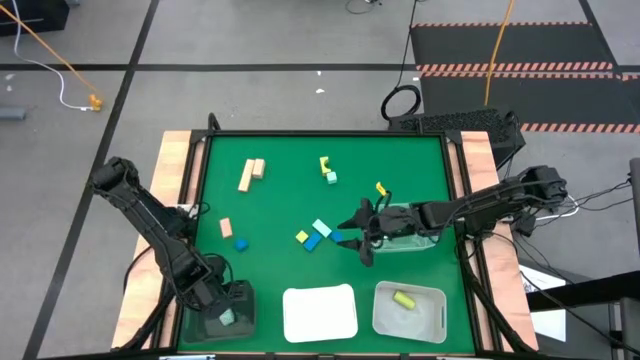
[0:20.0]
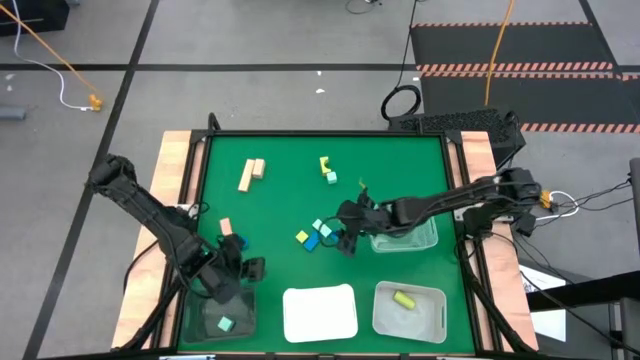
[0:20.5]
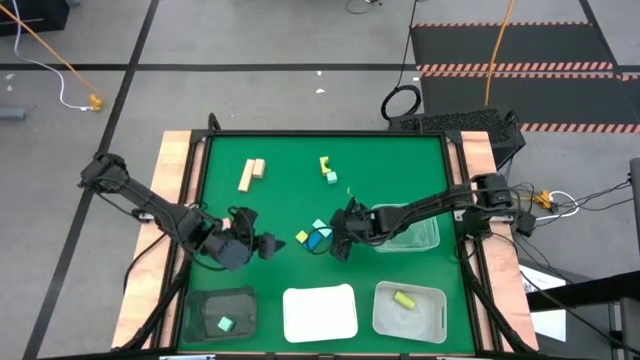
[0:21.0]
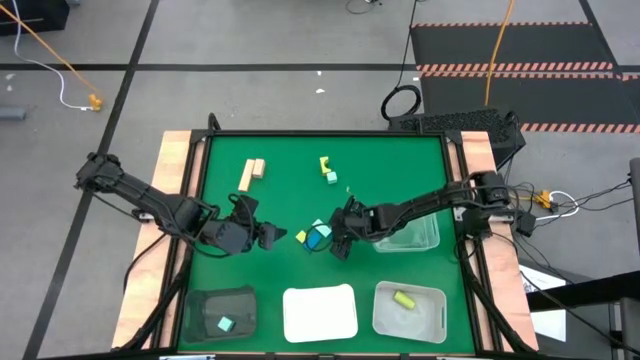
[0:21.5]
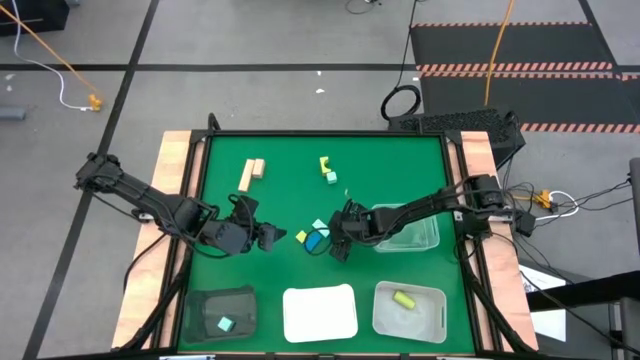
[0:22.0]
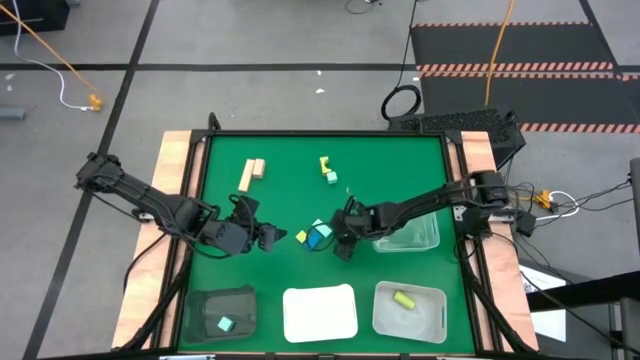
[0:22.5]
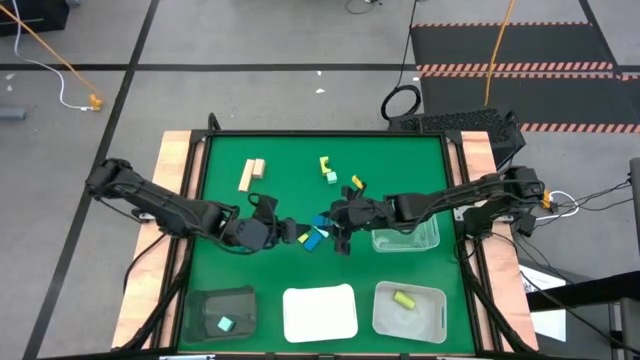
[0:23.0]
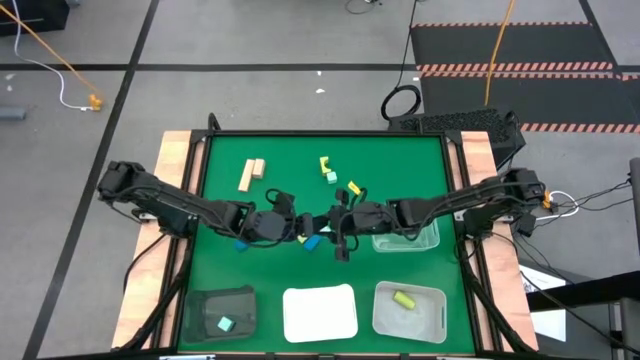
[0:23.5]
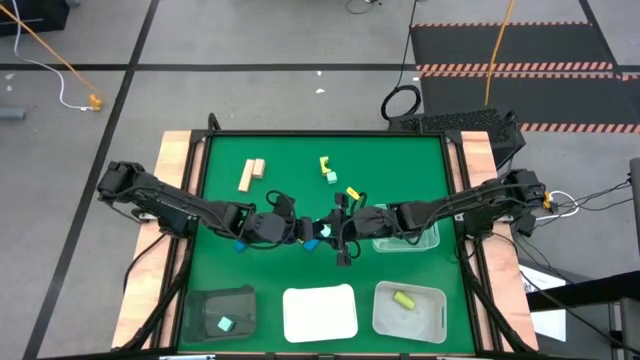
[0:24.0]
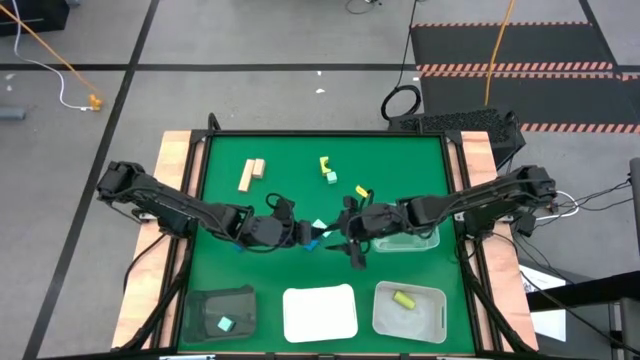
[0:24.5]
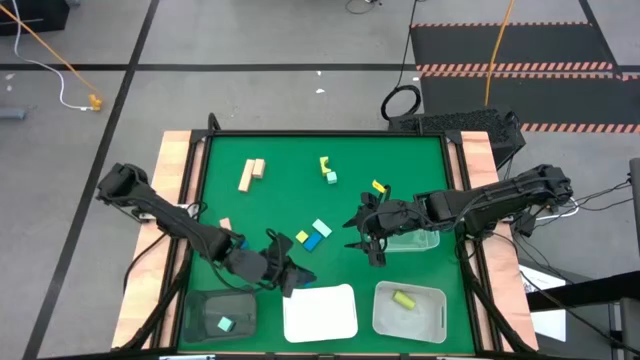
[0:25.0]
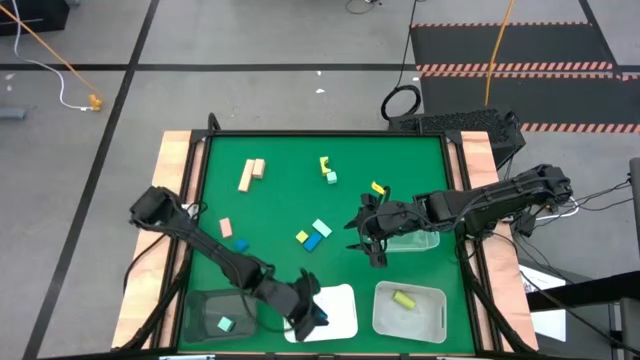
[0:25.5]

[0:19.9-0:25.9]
Task: Sort & place blocks by color
Put the top right blue block into the white bin

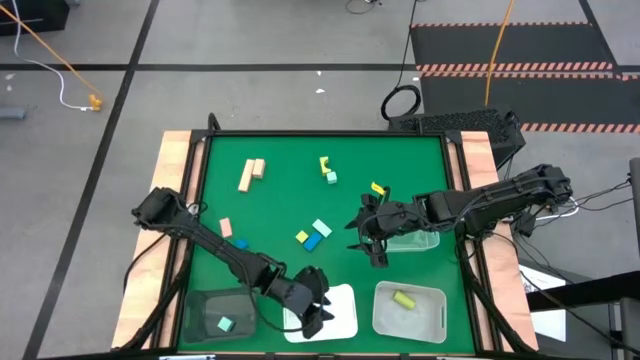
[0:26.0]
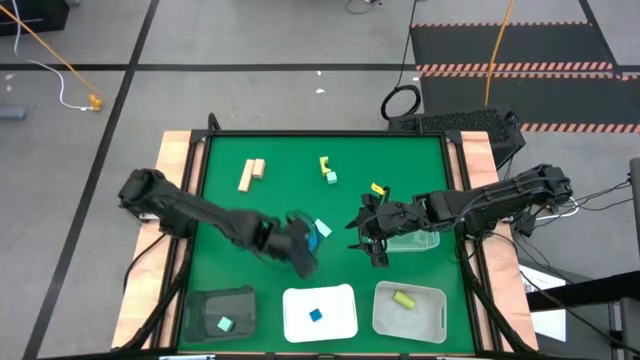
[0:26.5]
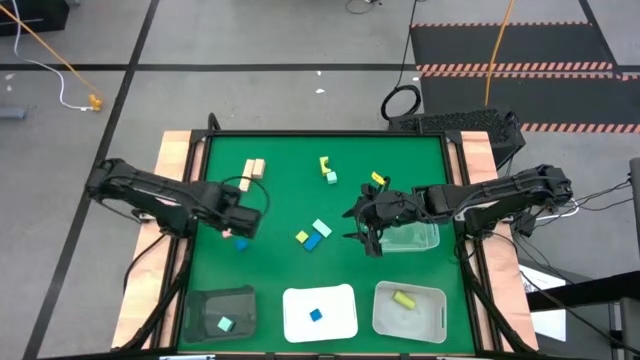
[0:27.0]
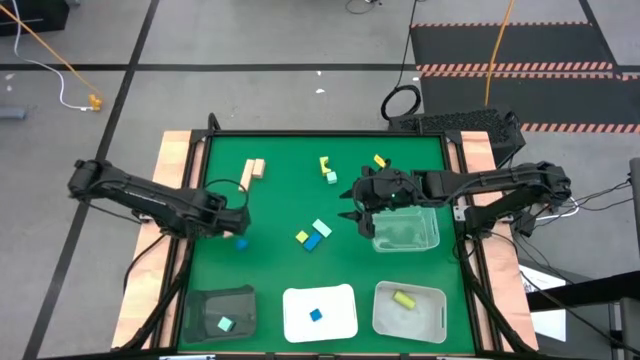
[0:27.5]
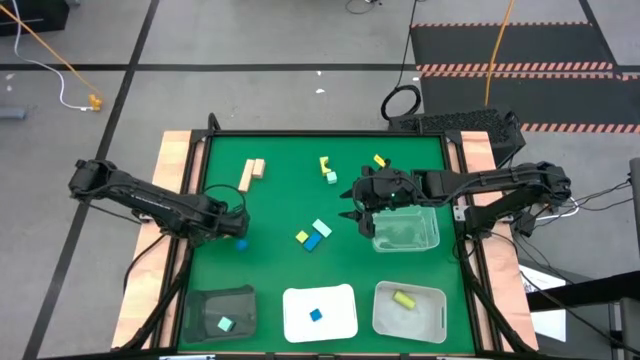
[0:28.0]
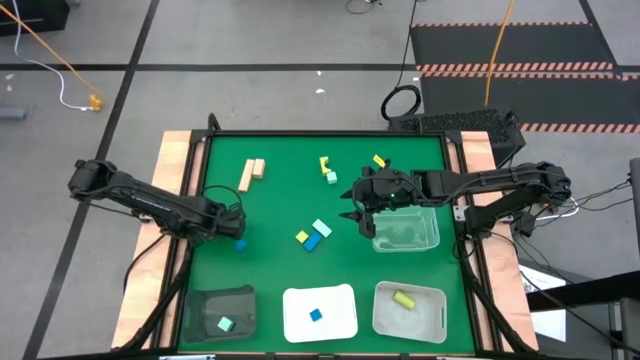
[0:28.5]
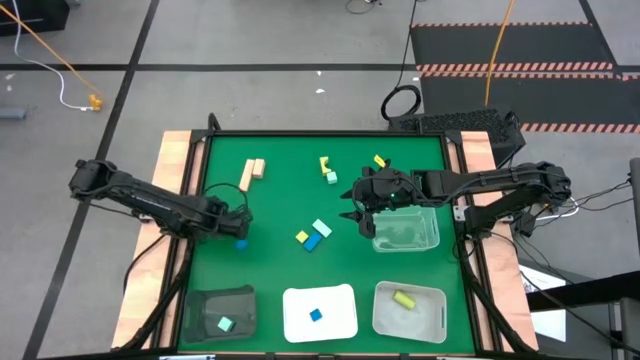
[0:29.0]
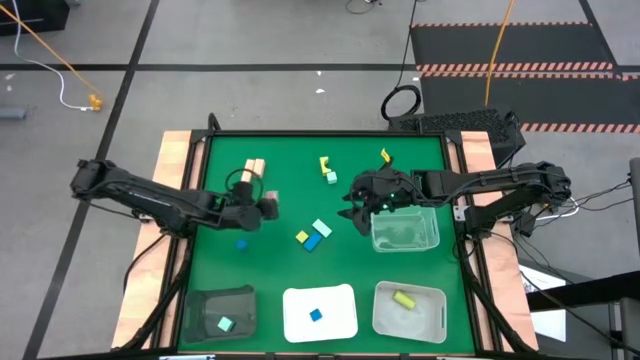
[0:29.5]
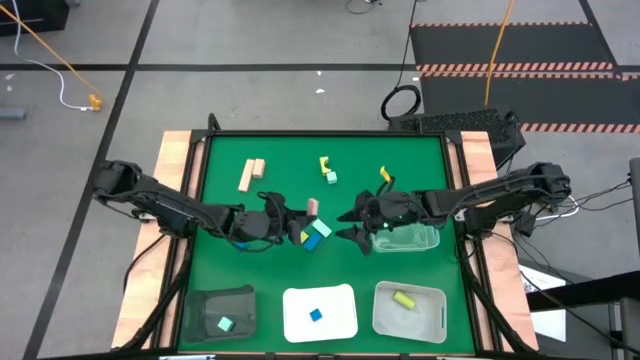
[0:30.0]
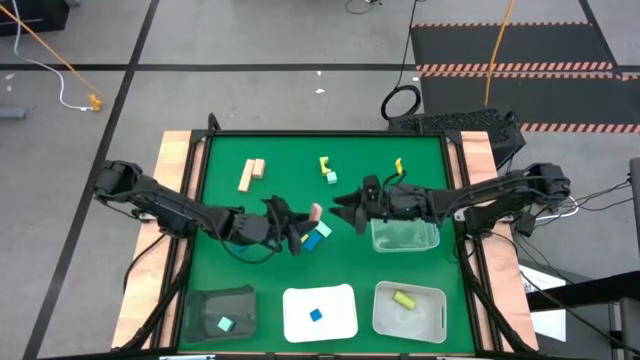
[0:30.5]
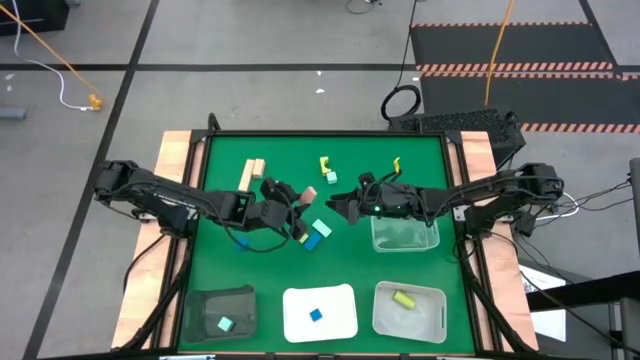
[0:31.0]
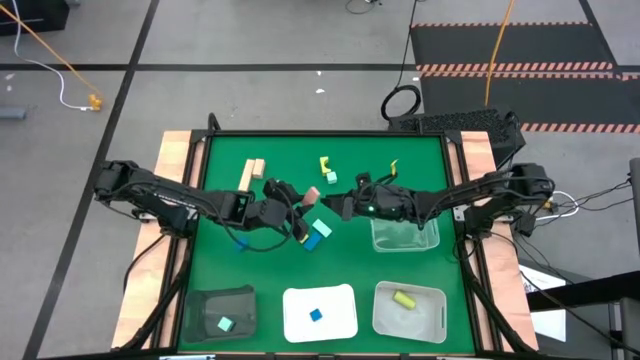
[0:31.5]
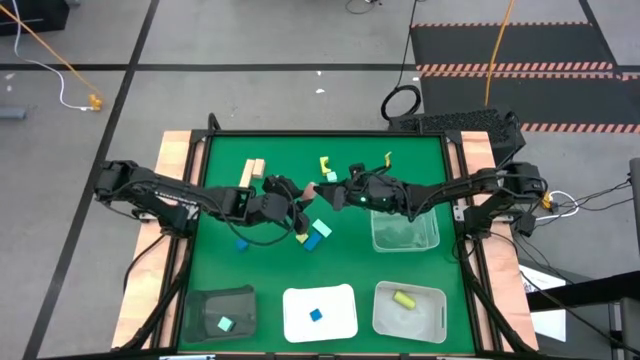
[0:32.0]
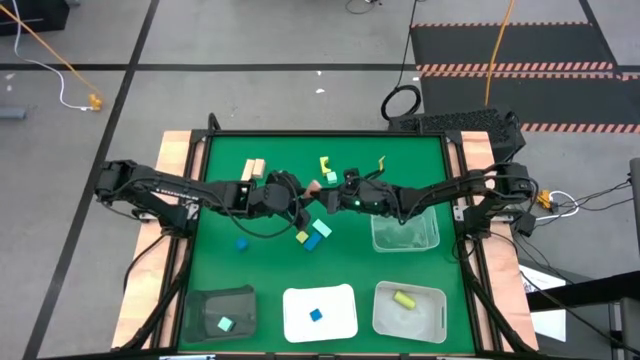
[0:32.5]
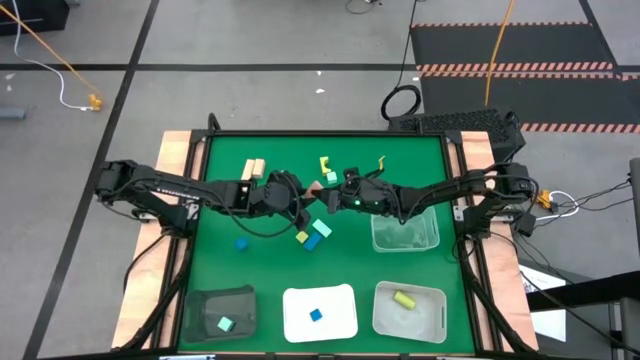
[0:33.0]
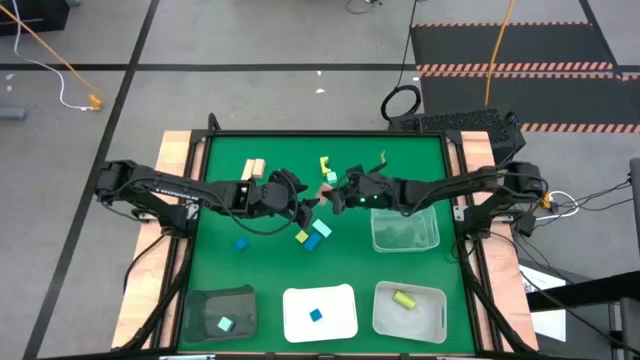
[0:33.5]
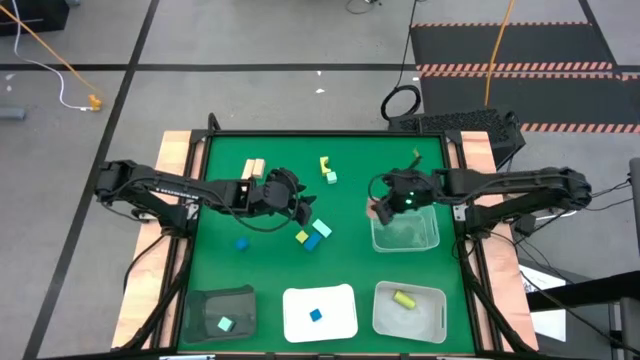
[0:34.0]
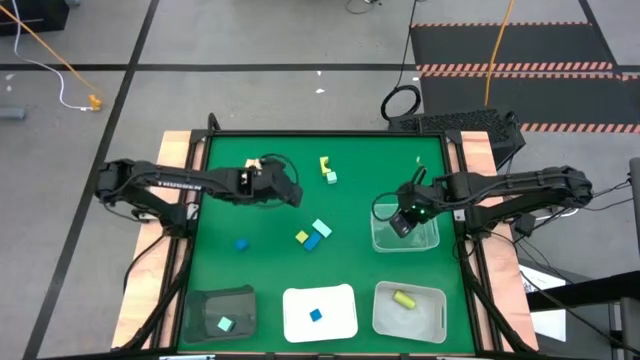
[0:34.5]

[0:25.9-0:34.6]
Put the bottom left brown block into the transparent bin

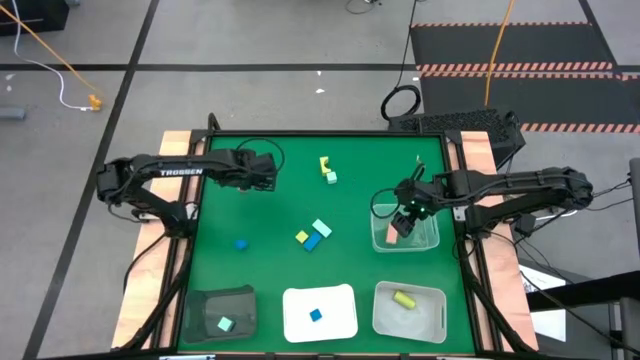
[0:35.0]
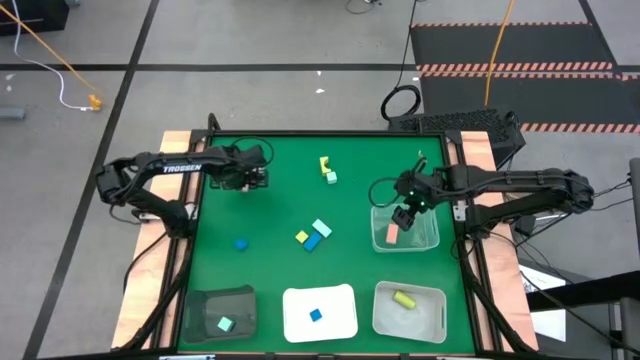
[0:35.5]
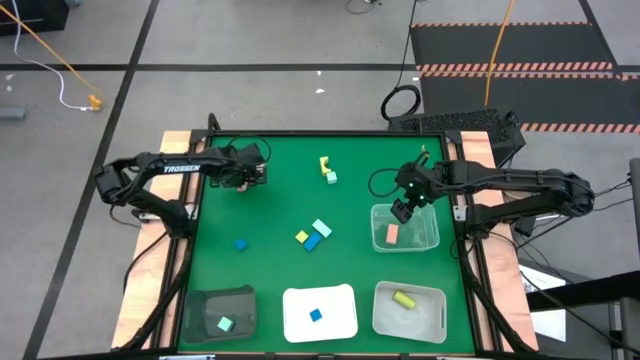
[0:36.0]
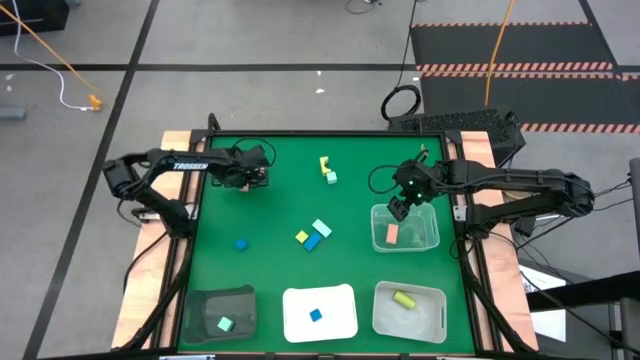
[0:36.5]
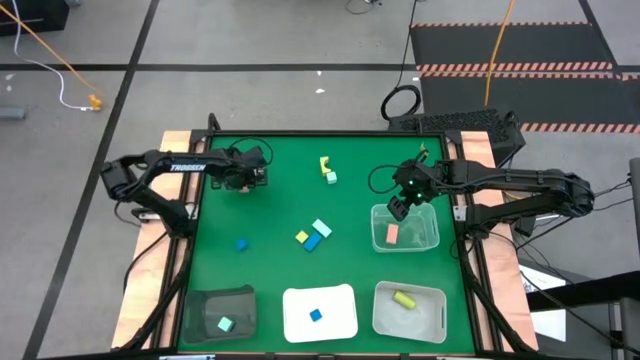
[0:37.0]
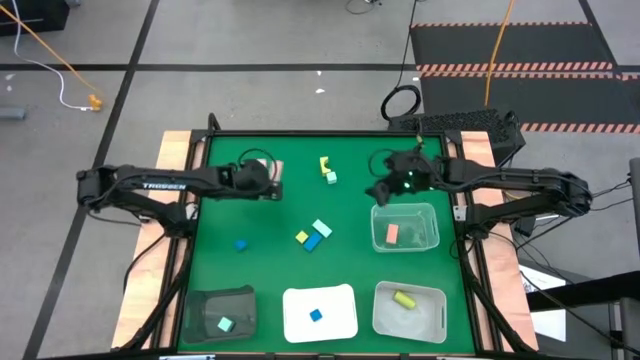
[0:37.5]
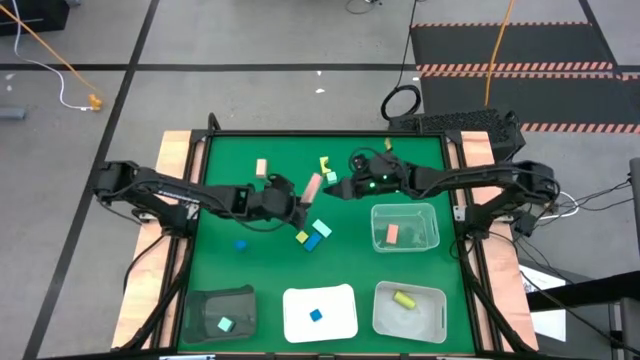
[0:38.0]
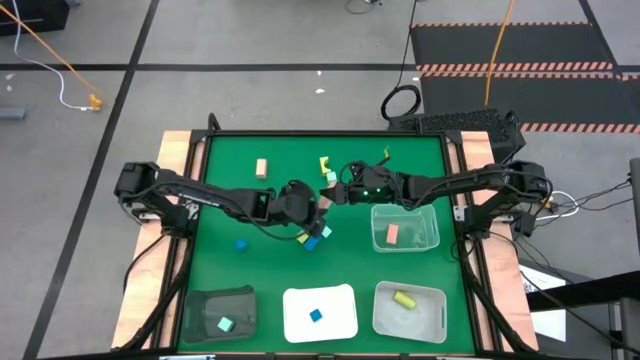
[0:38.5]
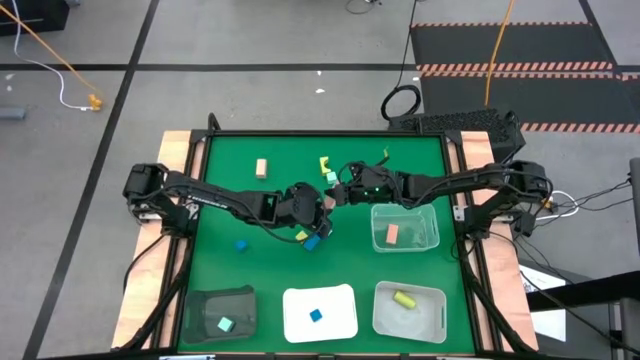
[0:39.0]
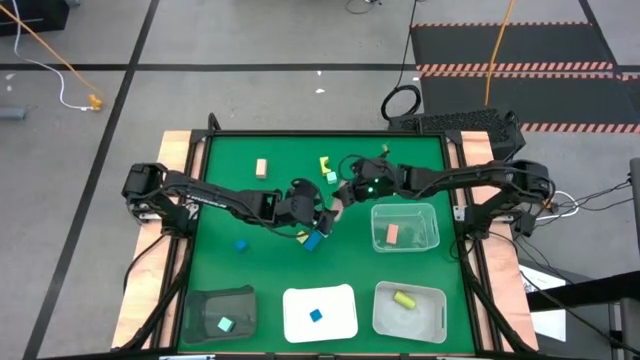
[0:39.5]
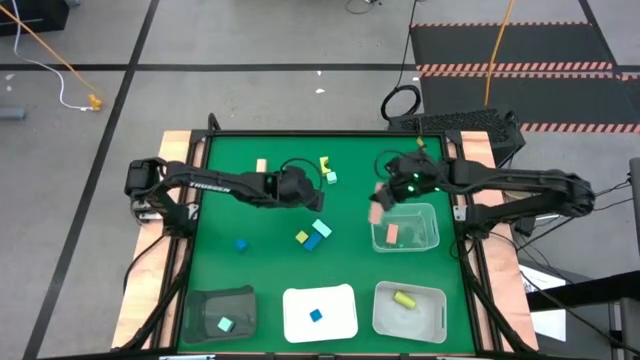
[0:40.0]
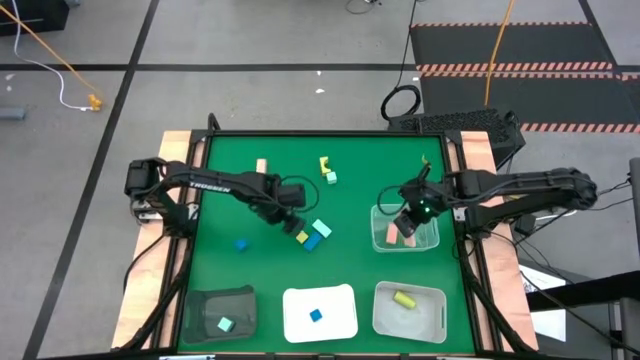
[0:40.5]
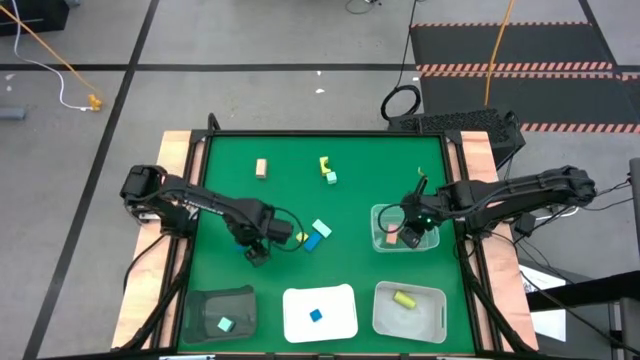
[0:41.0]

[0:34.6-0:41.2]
Put the left brown block into the transparent bin
